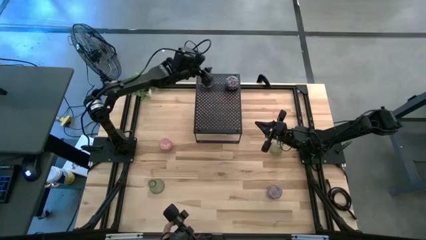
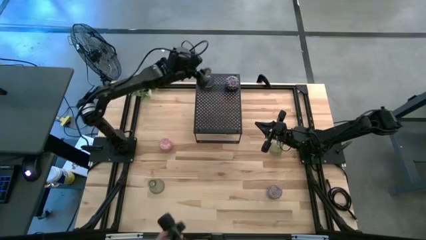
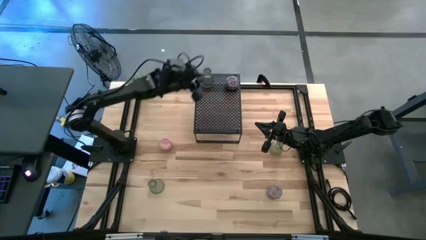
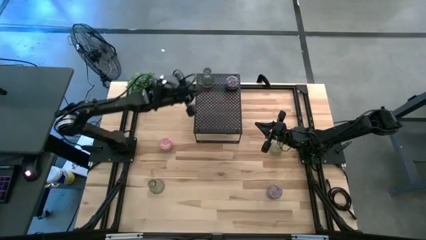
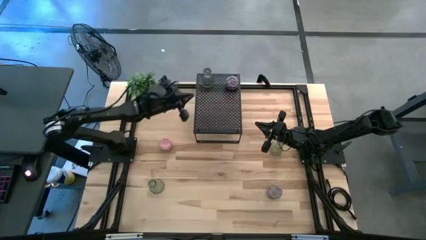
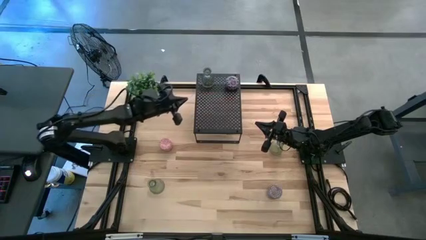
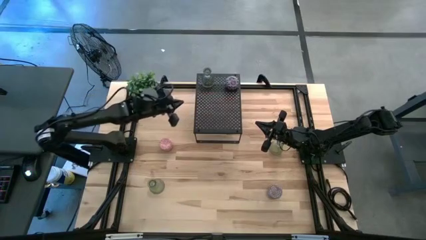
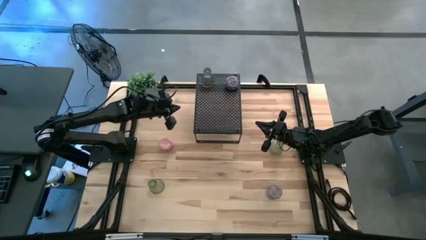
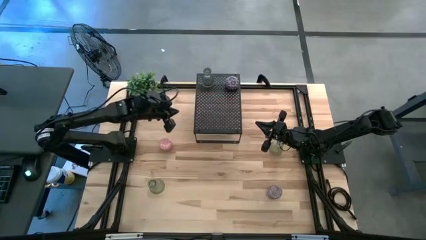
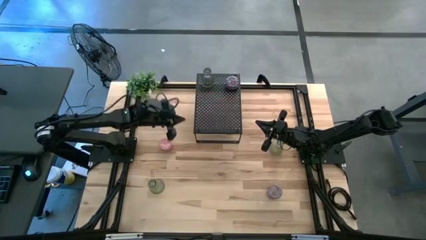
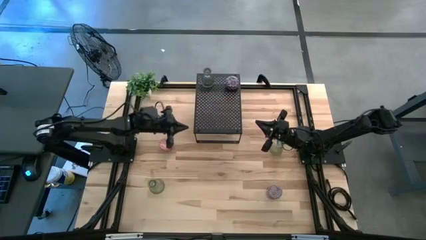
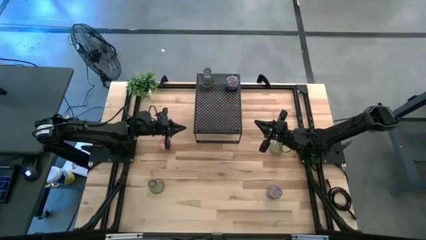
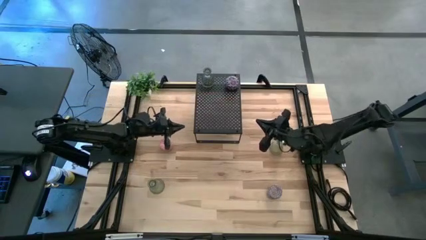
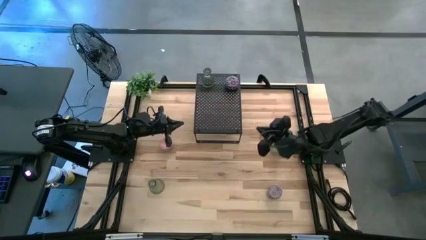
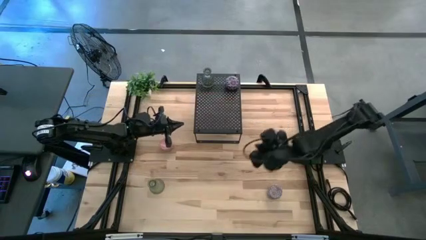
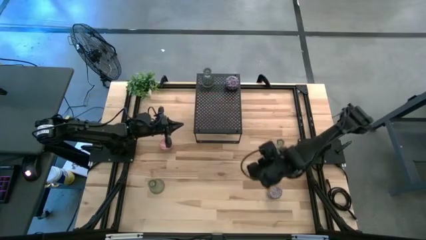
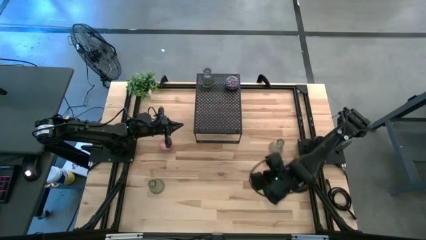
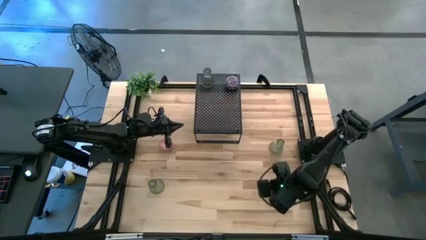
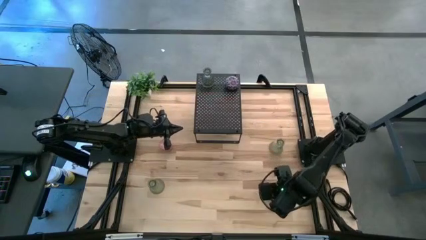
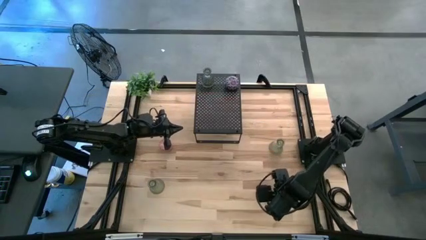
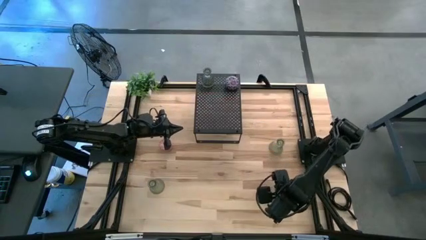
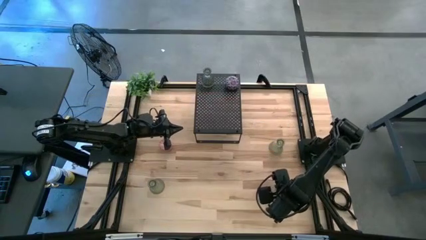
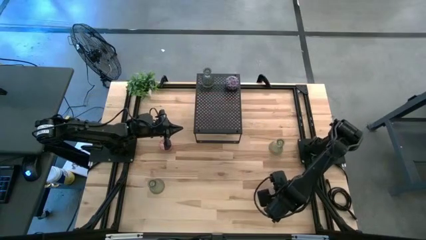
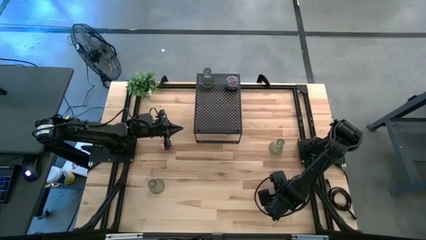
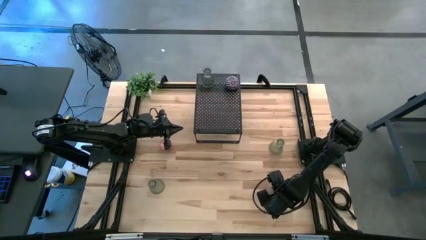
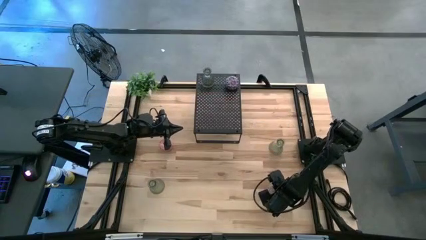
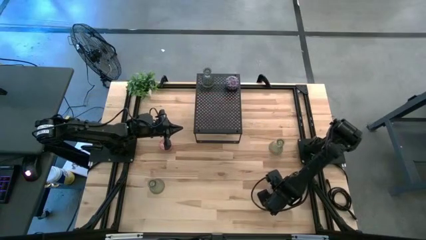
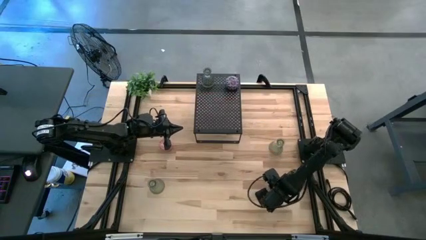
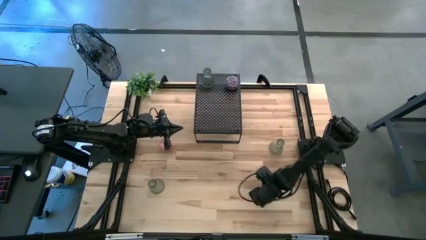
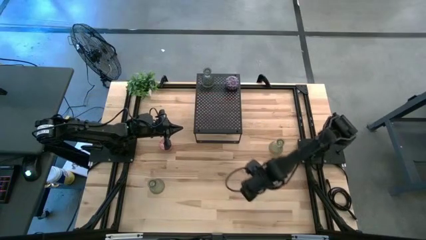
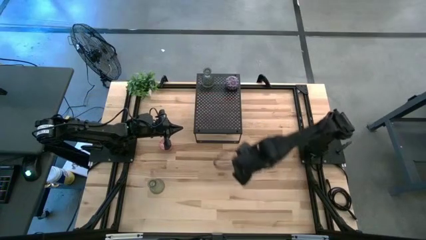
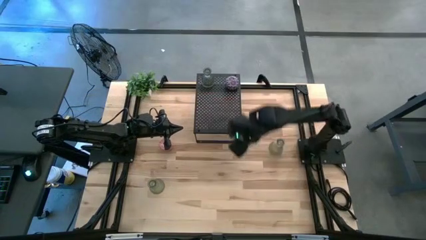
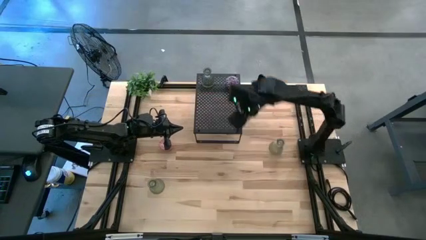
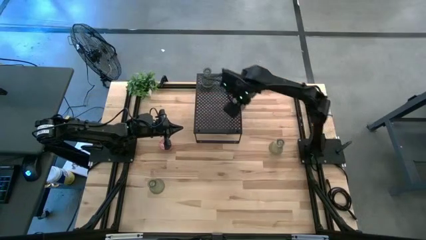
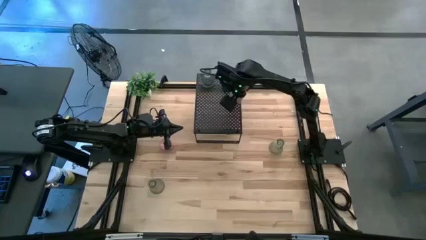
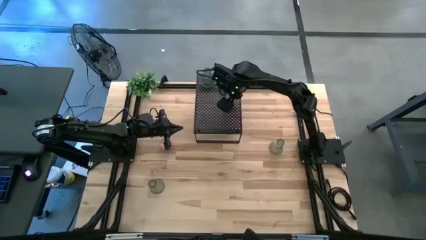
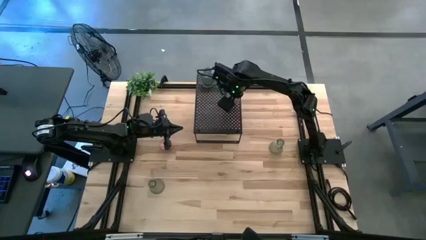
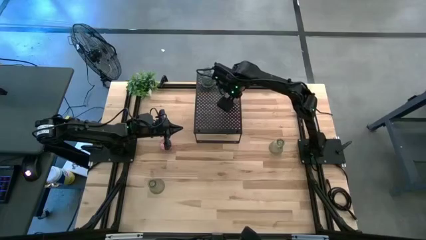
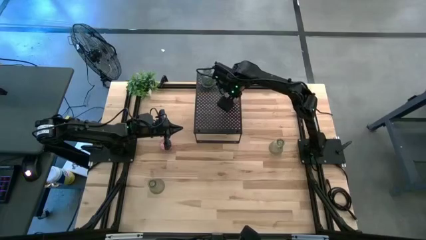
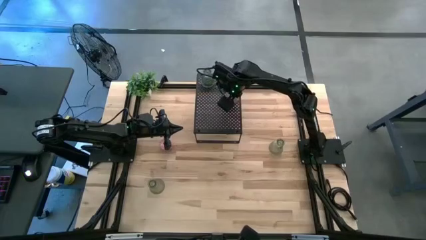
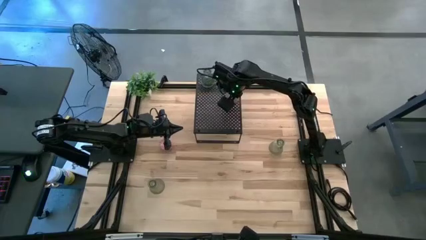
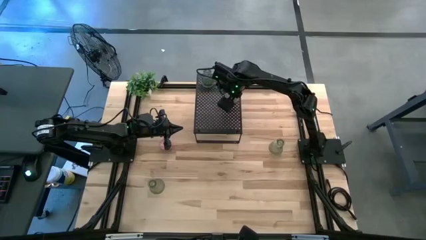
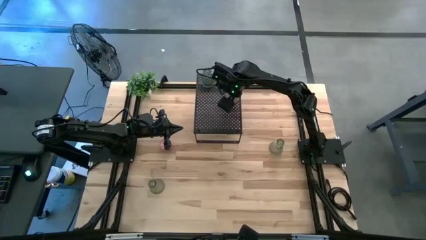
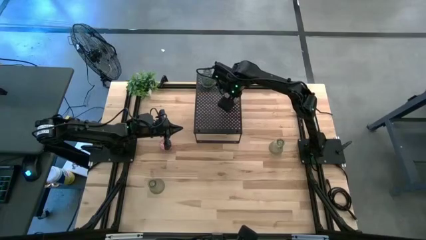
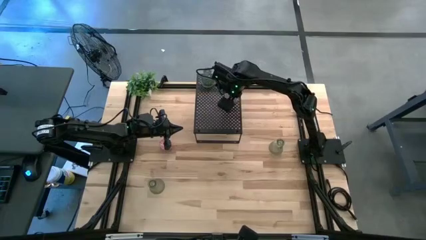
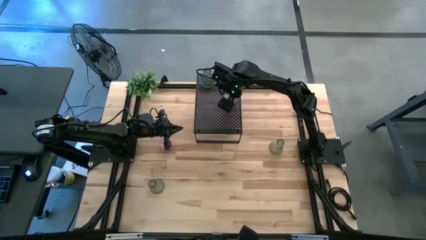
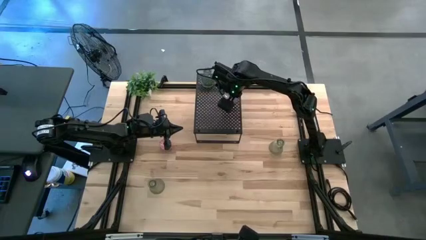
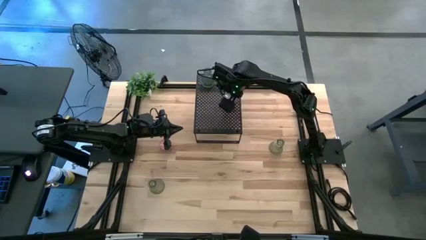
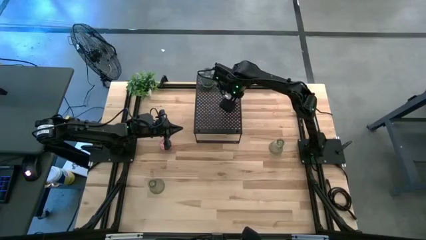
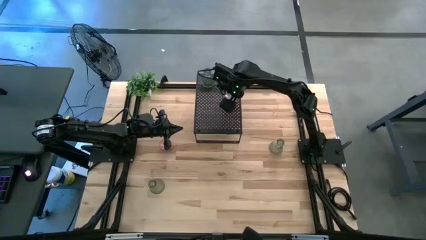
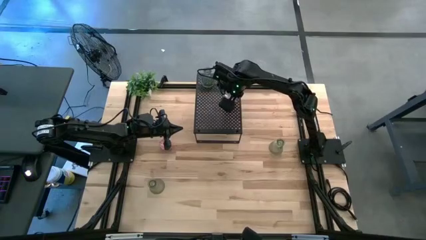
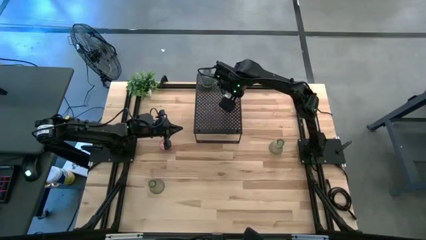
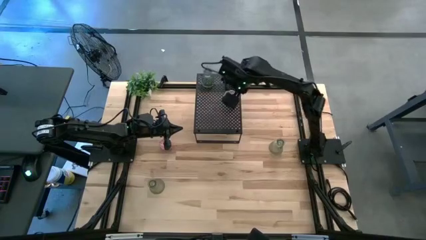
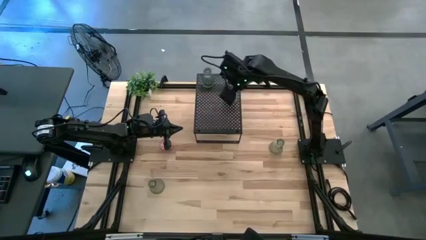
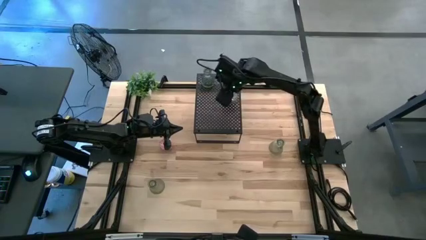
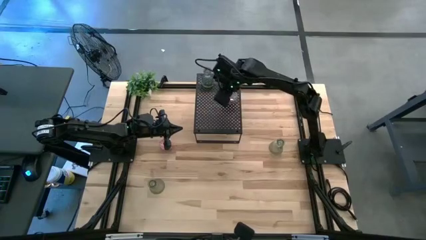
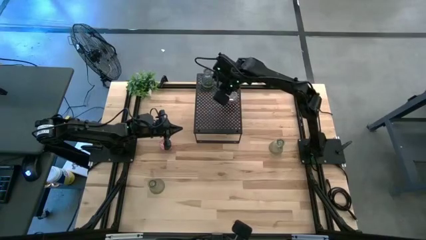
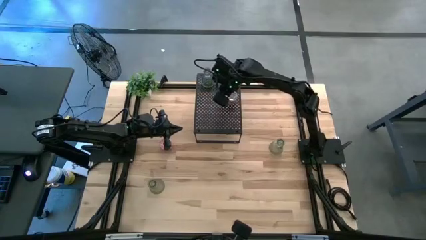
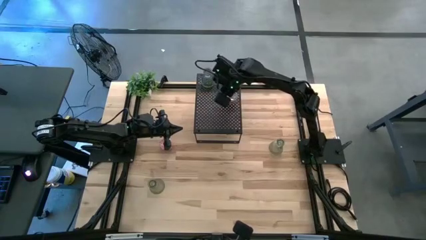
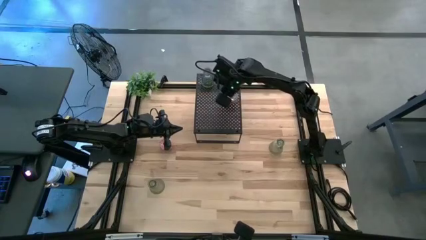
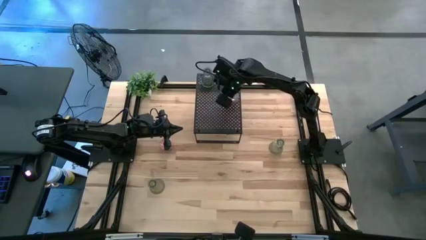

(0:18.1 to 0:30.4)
Task: Stock candles and vases on shelf
Put the red scented candle on the shelf
